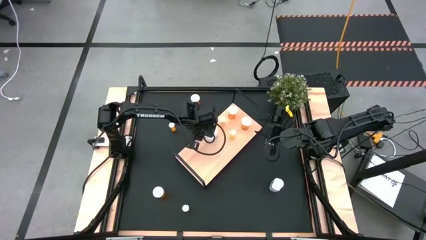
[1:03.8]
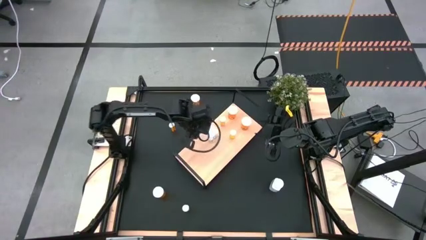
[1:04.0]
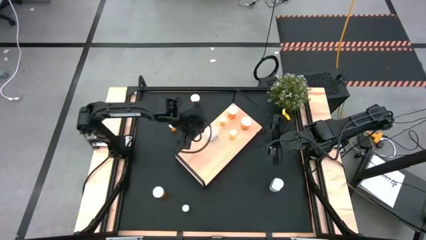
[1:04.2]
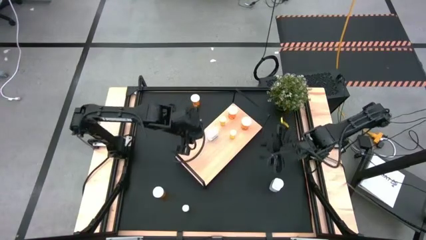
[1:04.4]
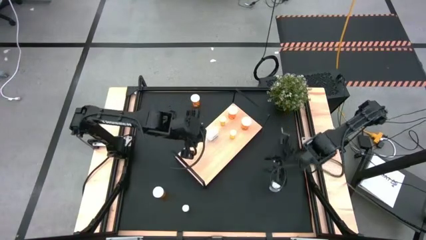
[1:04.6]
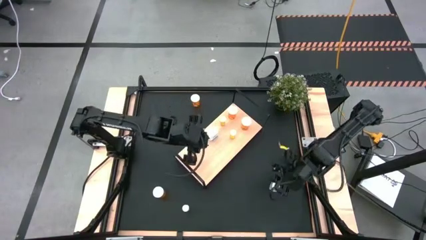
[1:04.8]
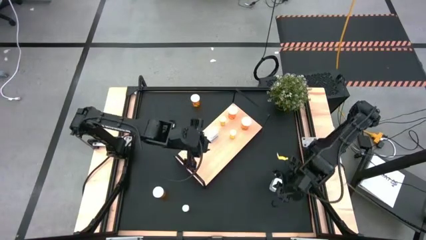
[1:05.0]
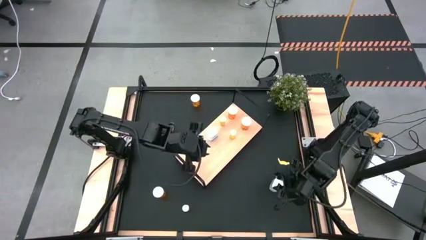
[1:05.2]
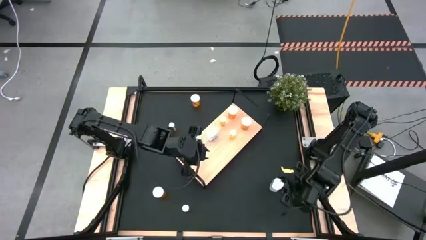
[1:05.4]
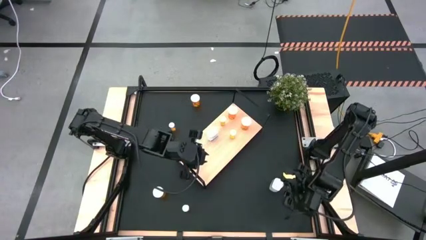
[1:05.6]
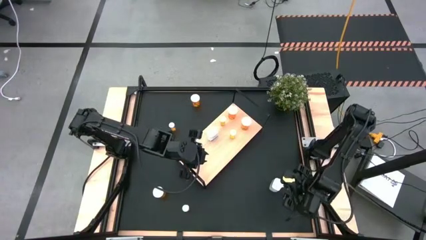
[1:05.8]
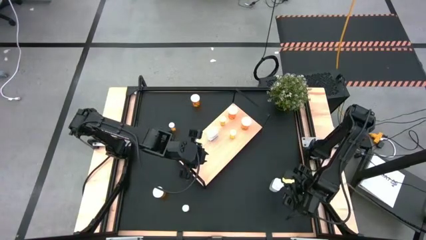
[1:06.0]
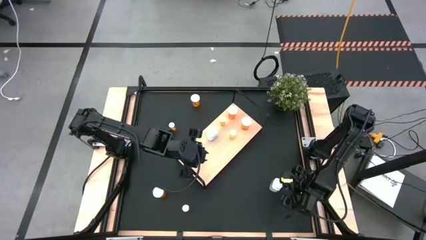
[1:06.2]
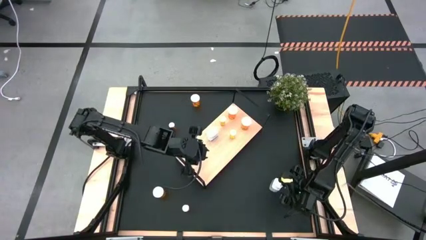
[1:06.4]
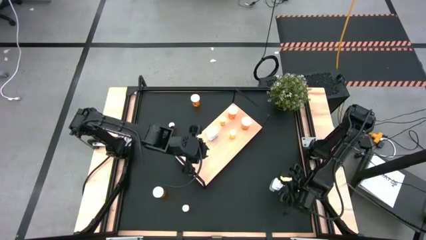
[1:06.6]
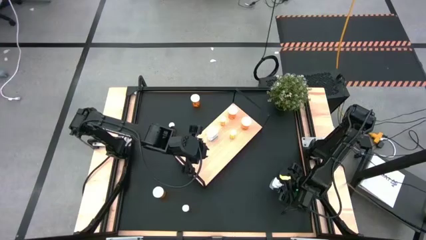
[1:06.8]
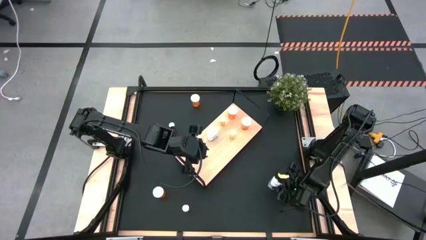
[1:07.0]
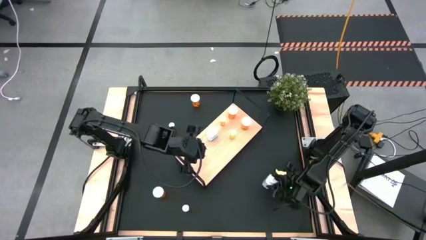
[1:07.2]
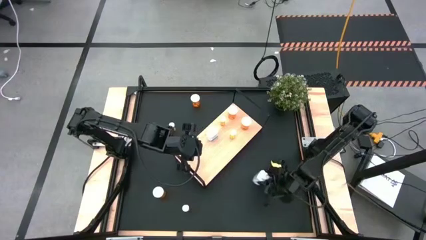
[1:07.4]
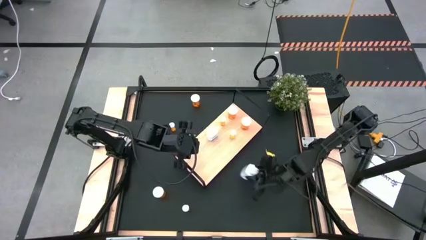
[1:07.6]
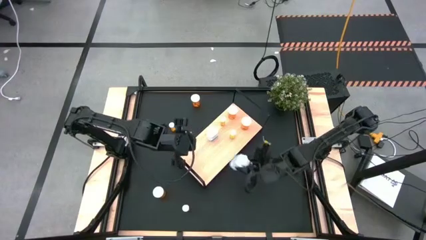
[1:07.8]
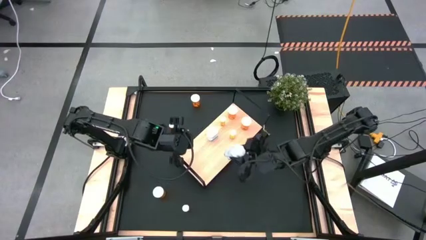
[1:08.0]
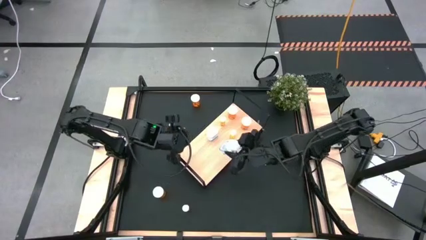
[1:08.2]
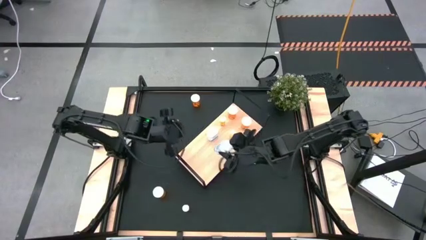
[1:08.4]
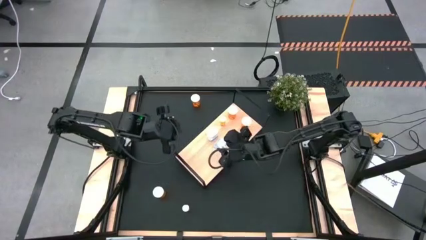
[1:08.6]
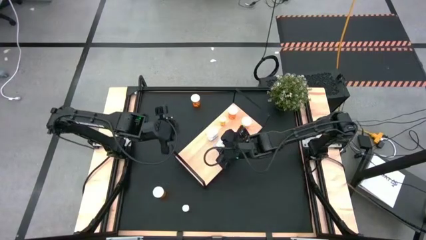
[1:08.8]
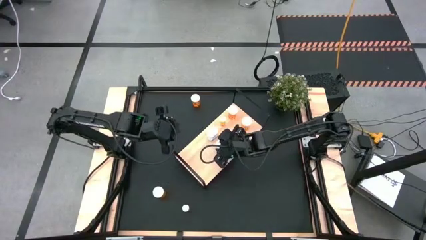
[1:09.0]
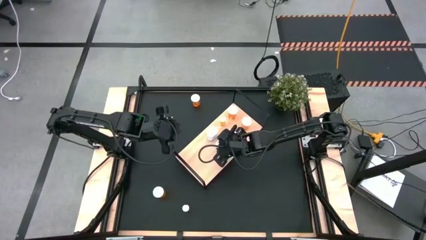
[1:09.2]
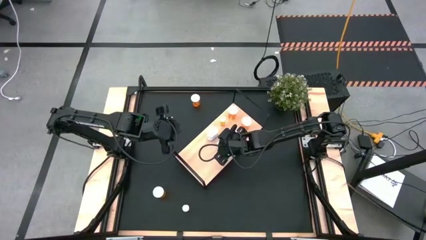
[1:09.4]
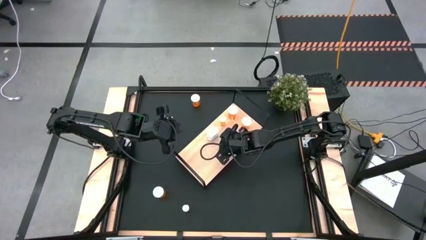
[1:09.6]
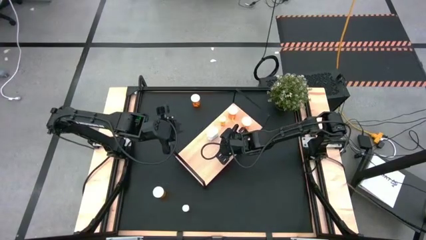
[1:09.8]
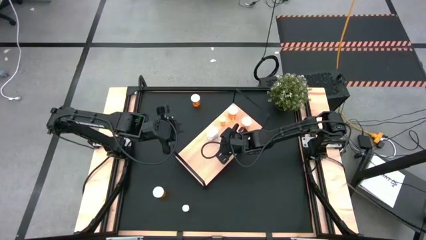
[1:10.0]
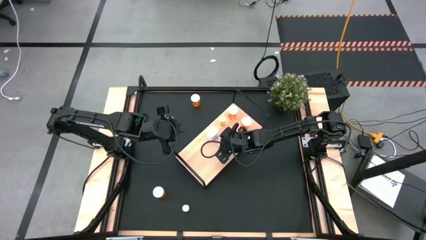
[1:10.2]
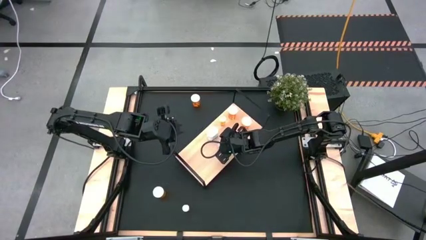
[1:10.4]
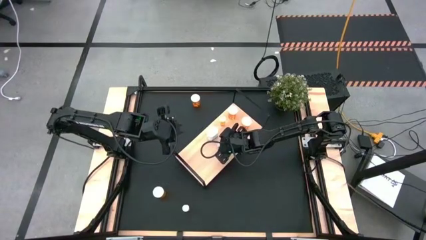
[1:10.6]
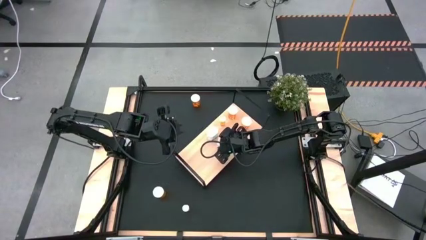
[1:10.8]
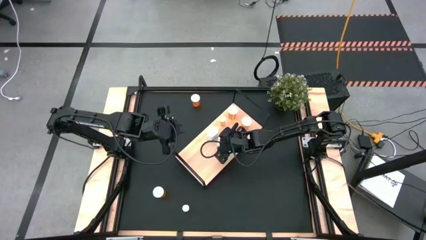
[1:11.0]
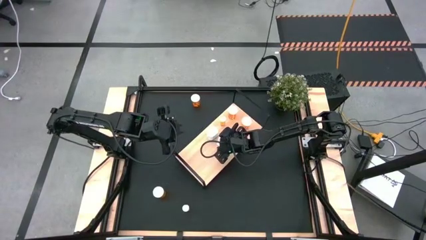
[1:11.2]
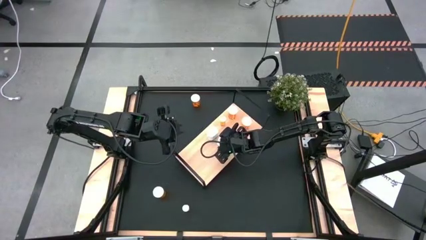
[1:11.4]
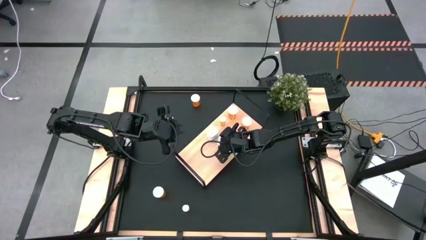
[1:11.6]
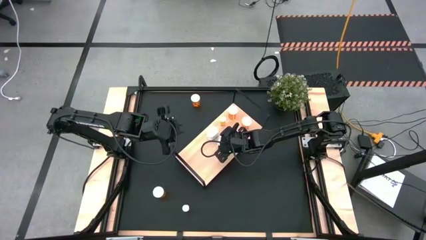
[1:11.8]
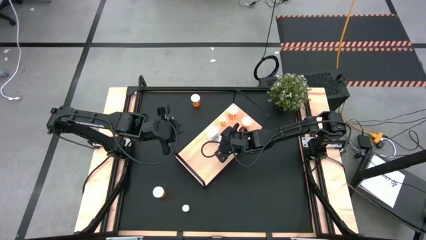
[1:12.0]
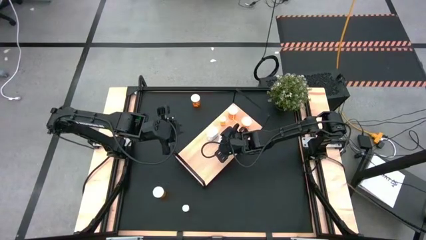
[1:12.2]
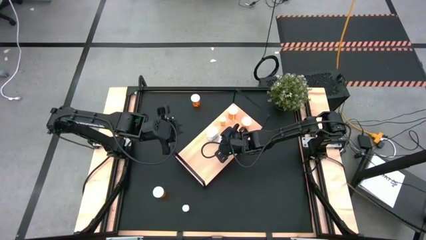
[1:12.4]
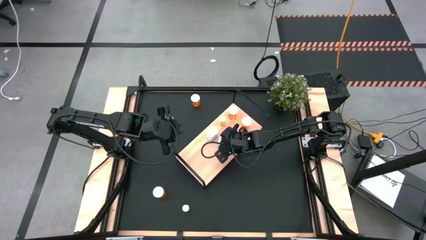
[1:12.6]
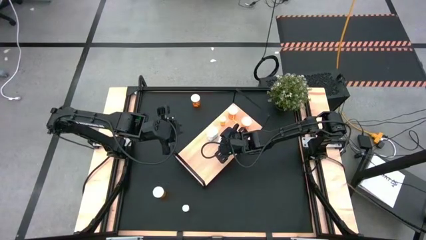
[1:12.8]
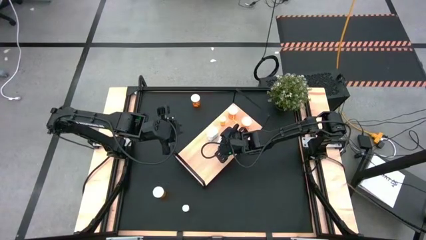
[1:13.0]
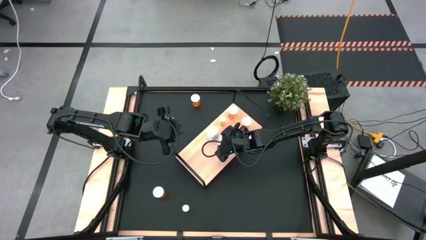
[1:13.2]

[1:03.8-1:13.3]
Task: Pick and place medicine bottles onto shelf by color
Align the white pill bottle with the other white pill bottle on the shelf

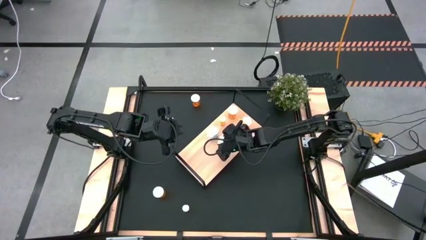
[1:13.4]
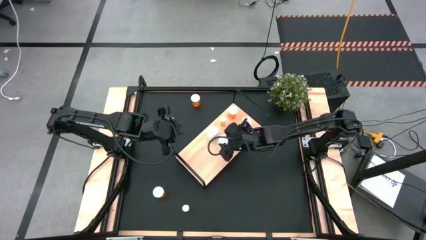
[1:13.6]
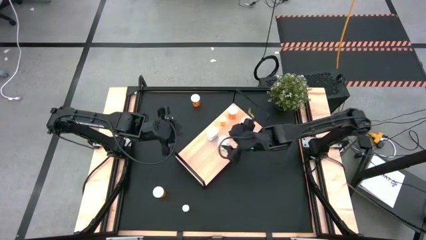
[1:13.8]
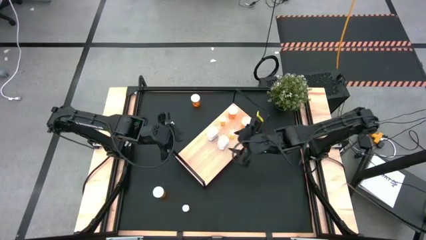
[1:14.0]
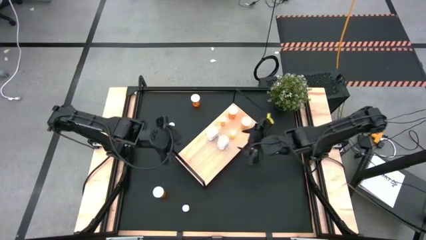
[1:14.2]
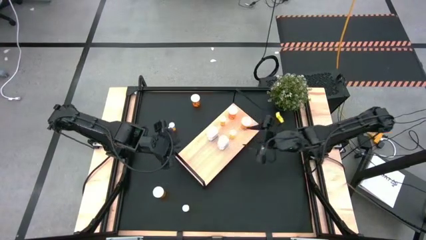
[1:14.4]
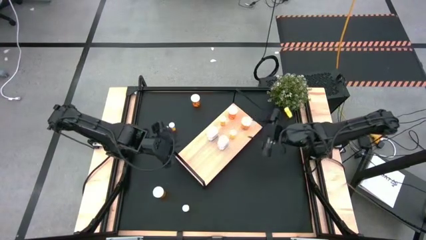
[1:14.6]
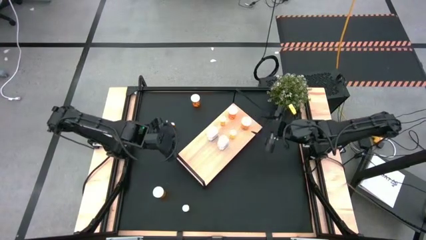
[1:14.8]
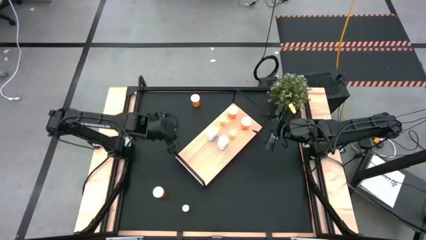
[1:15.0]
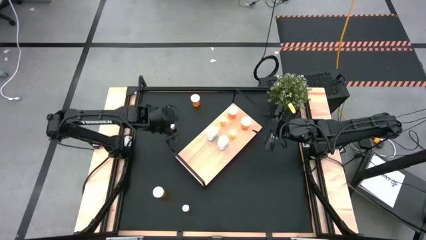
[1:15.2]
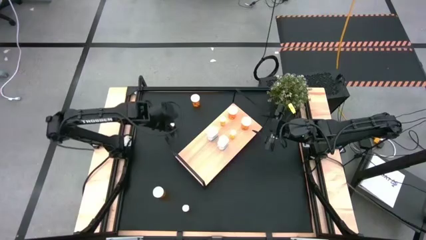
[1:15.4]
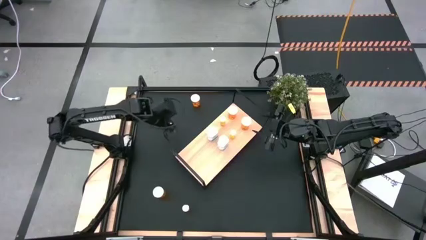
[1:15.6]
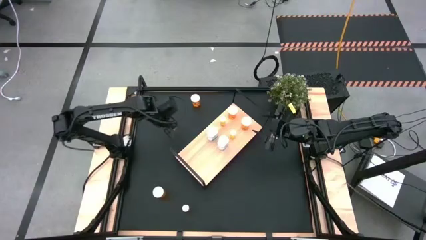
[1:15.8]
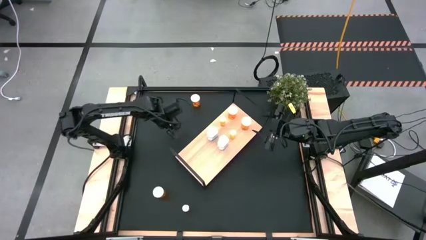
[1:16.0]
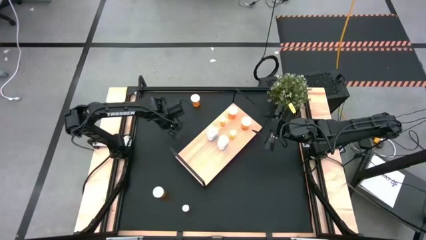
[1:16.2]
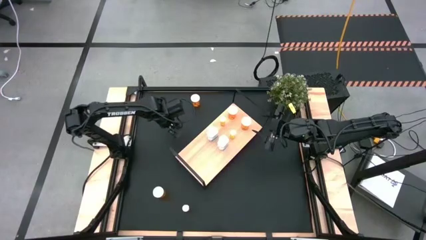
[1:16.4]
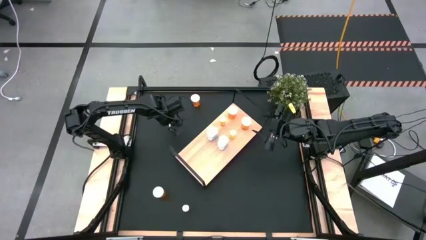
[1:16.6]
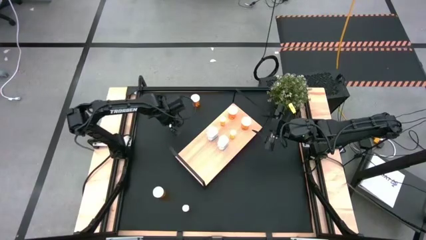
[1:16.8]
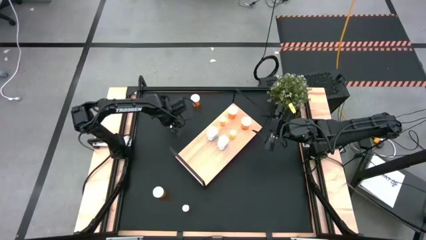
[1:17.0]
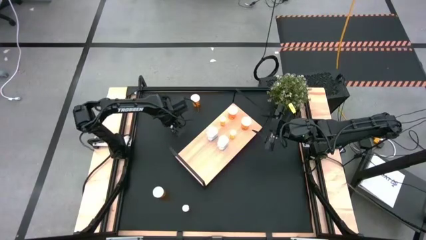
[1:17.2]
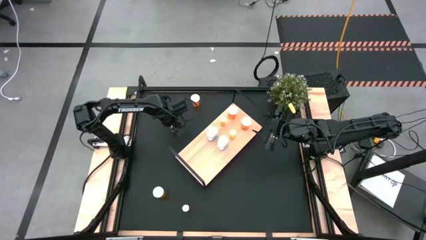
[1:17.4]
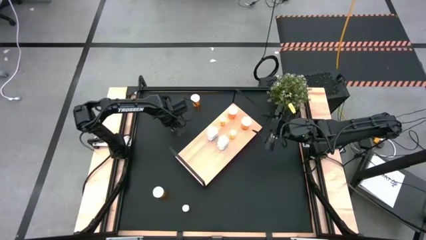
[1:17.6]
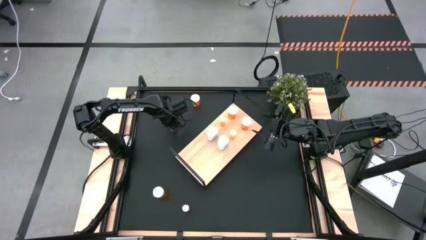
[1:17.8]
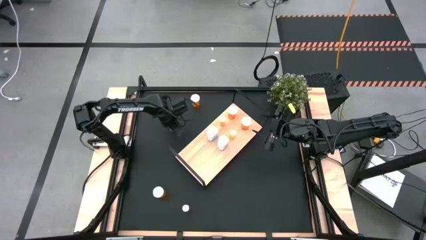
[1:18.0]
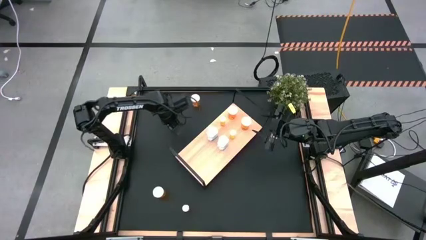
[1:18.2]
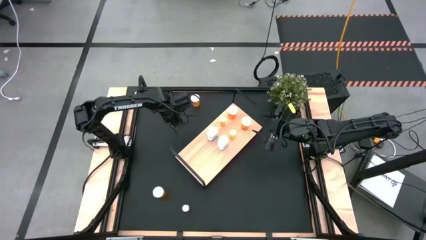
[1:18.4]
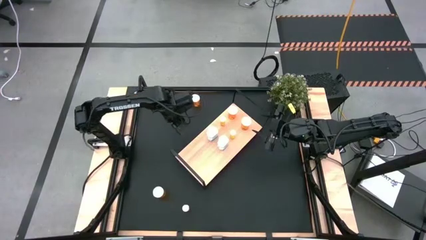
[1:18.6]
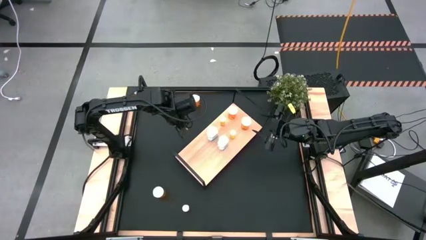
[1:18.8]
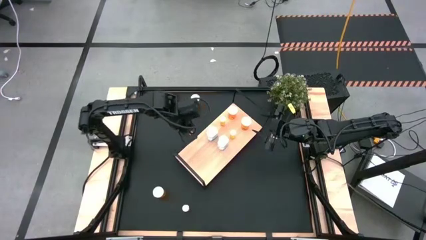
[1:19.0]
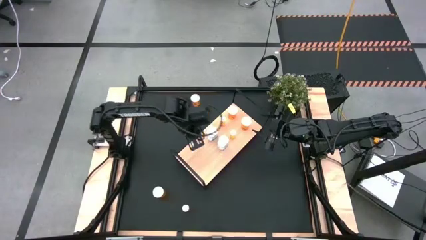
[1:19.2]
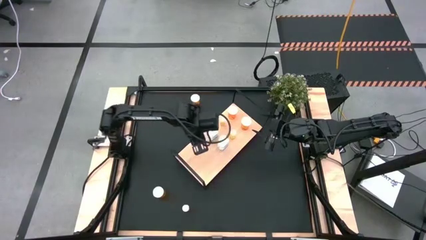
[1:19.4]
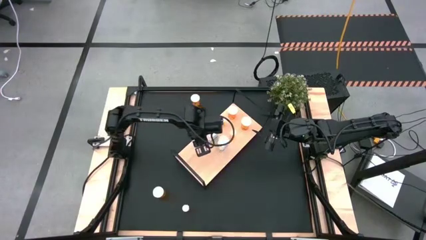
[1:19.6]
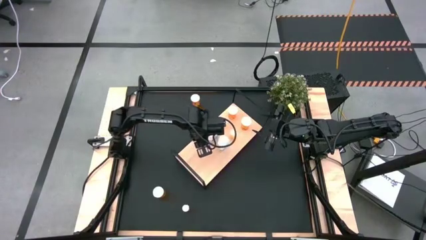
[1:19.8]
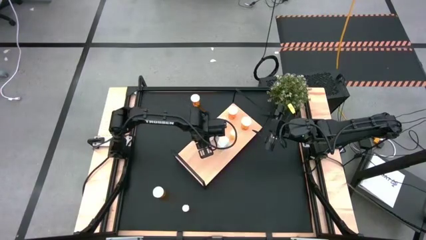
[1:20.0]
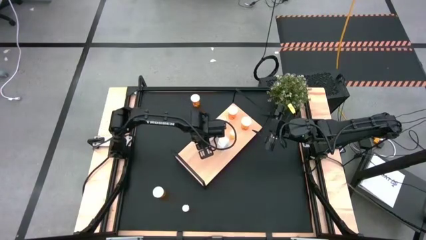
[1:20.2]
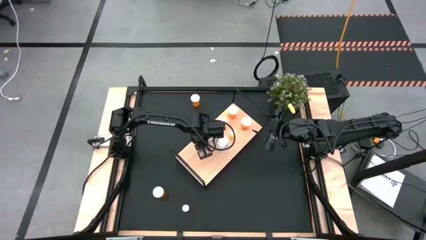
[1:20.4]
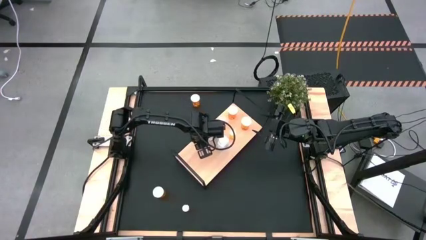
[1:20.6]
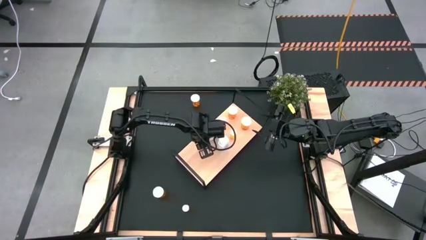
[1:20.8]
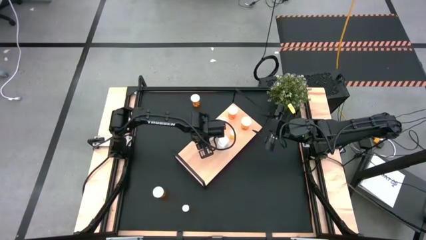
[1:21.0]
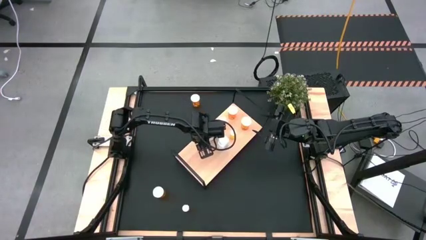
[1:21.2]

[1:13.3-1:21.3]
Put the small orange pill bottle on the shelf
